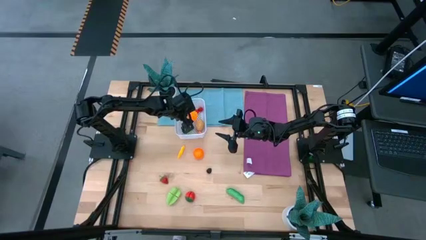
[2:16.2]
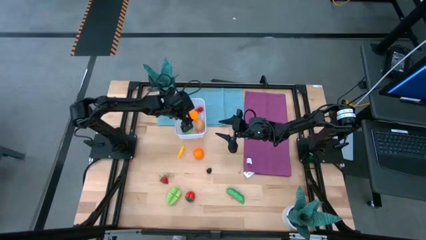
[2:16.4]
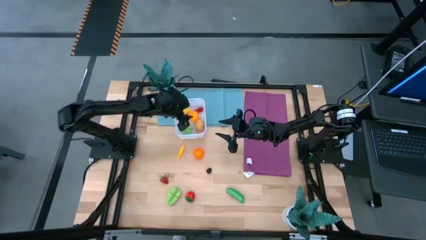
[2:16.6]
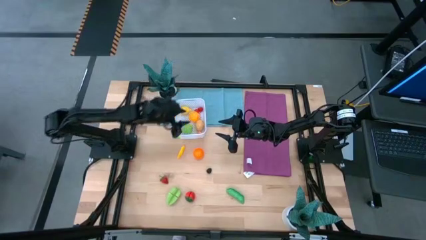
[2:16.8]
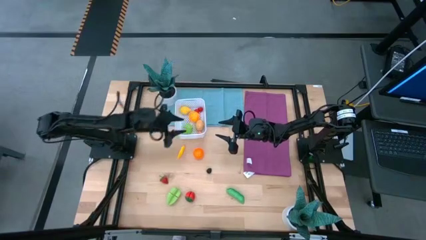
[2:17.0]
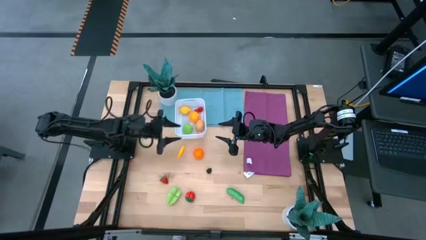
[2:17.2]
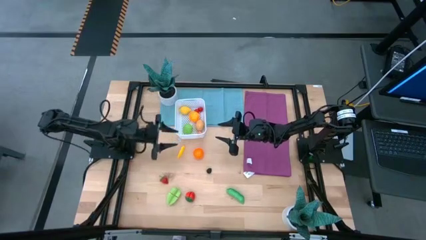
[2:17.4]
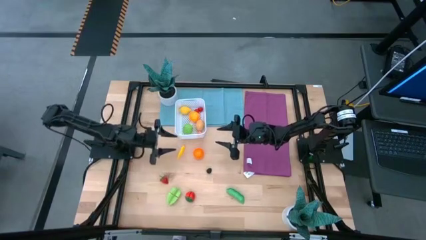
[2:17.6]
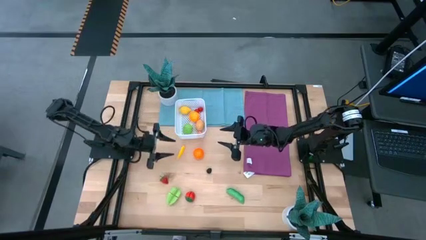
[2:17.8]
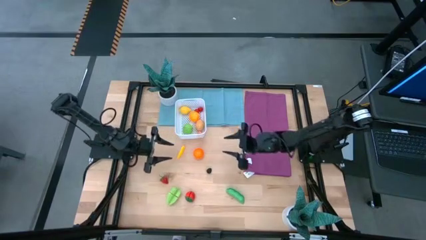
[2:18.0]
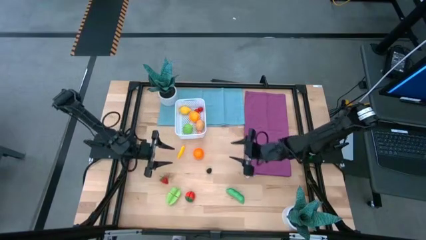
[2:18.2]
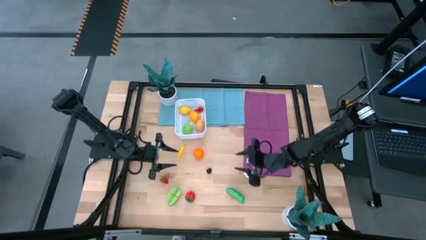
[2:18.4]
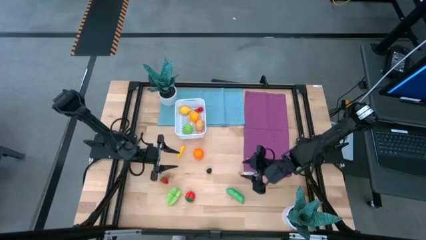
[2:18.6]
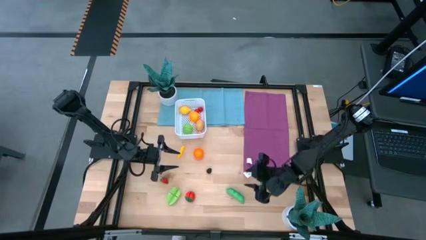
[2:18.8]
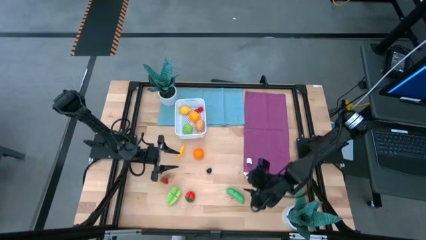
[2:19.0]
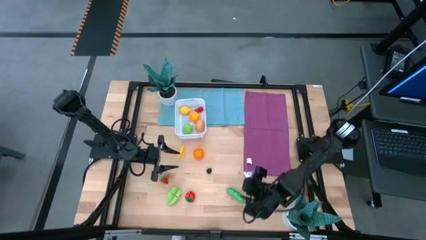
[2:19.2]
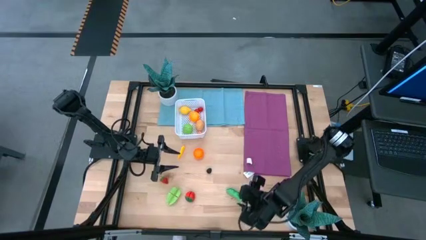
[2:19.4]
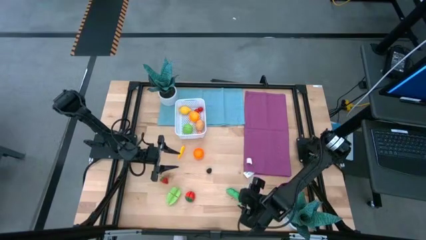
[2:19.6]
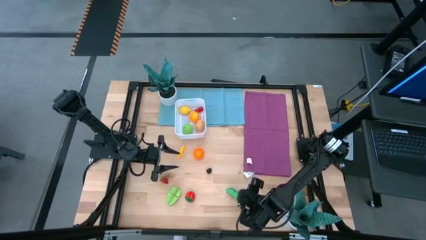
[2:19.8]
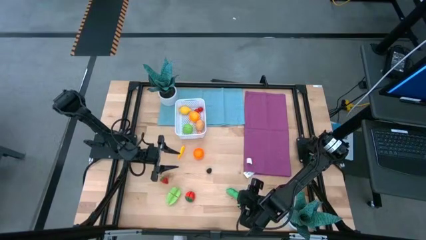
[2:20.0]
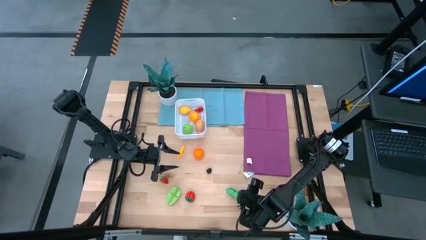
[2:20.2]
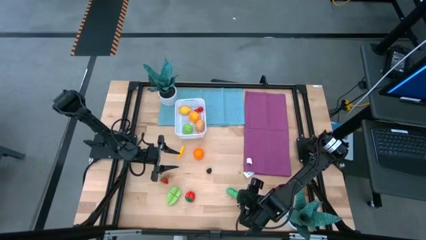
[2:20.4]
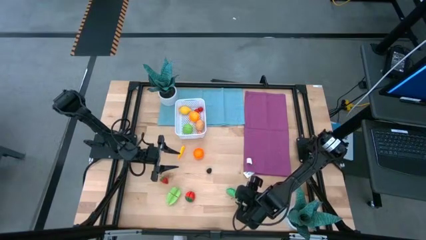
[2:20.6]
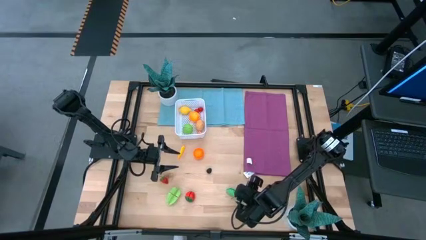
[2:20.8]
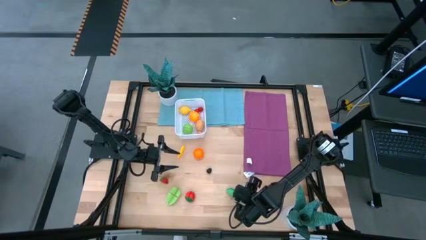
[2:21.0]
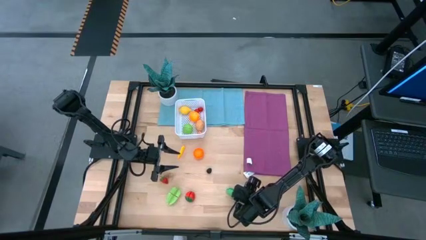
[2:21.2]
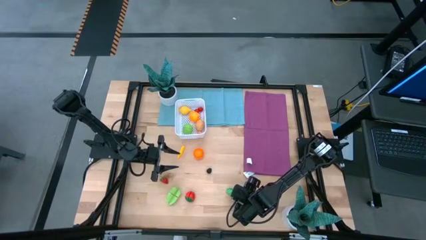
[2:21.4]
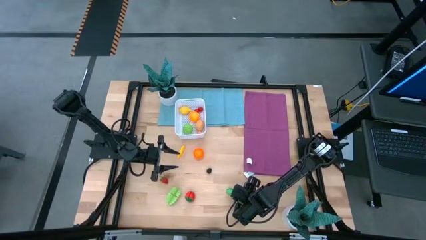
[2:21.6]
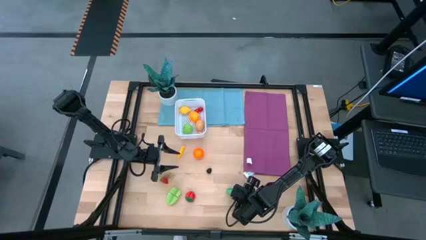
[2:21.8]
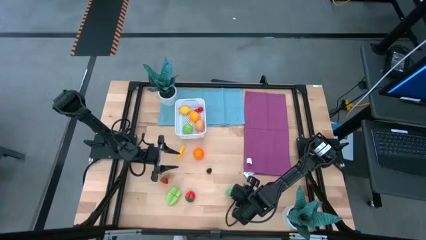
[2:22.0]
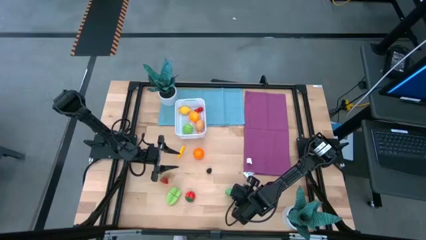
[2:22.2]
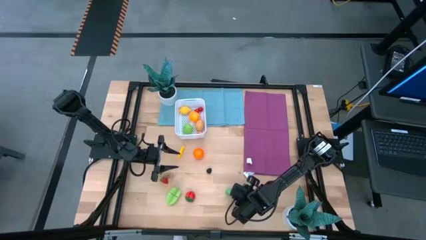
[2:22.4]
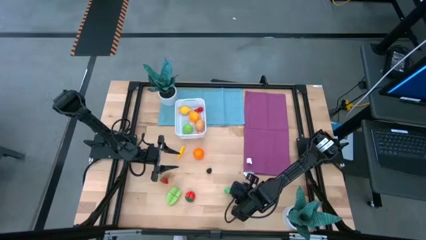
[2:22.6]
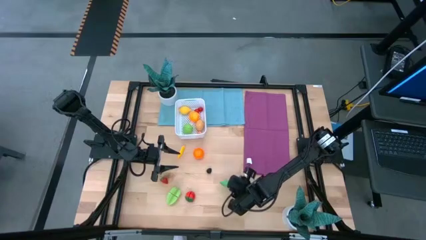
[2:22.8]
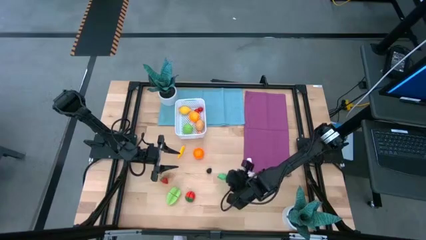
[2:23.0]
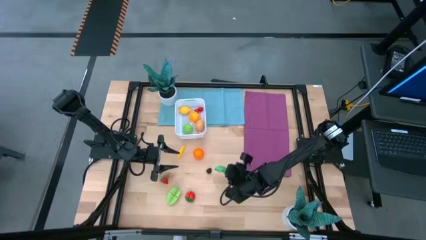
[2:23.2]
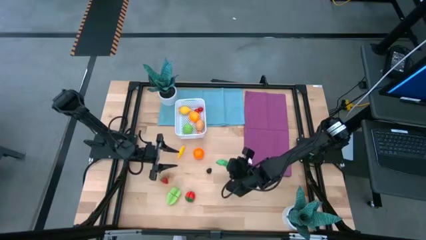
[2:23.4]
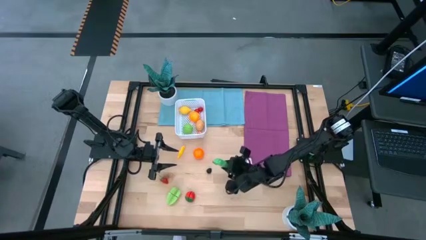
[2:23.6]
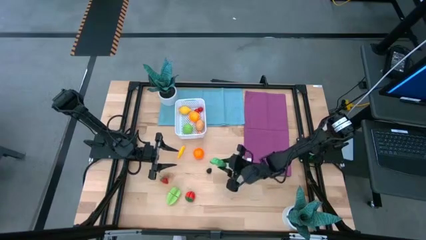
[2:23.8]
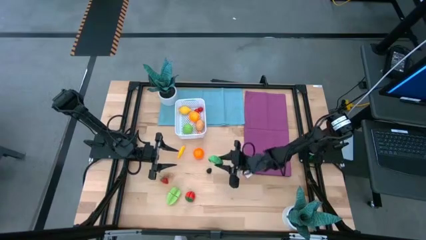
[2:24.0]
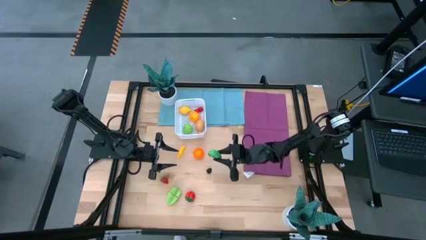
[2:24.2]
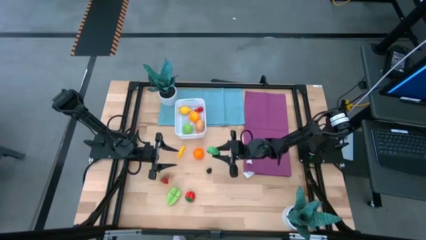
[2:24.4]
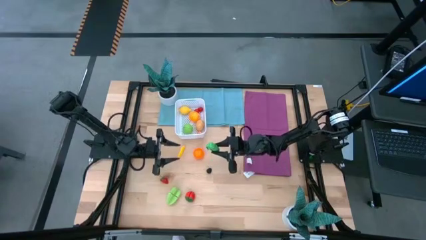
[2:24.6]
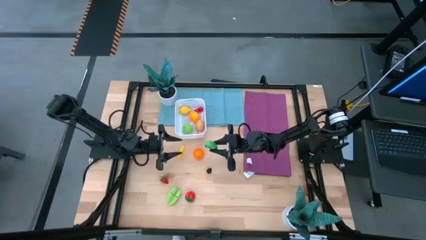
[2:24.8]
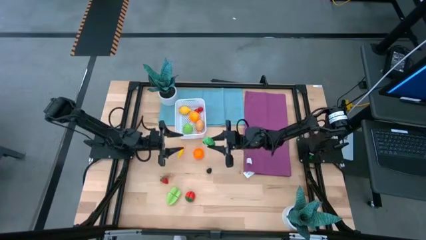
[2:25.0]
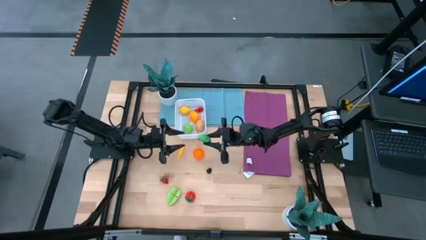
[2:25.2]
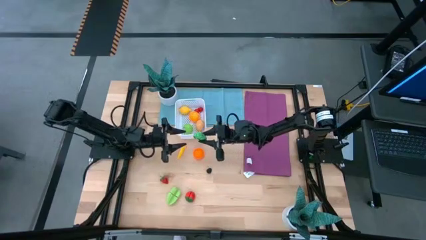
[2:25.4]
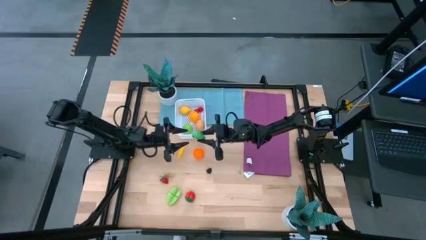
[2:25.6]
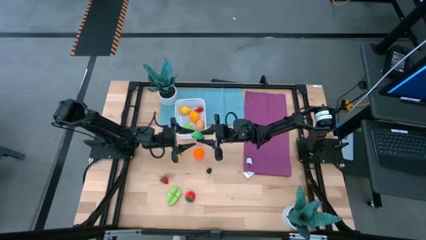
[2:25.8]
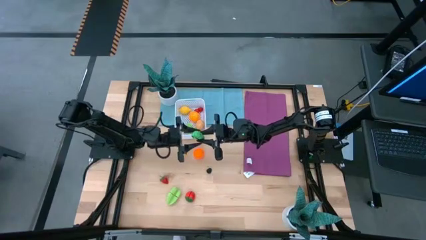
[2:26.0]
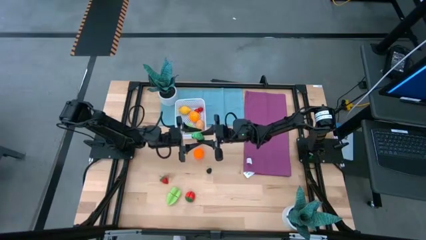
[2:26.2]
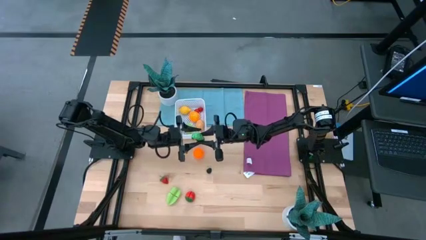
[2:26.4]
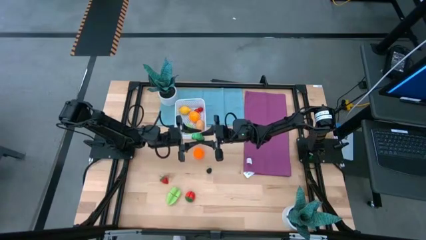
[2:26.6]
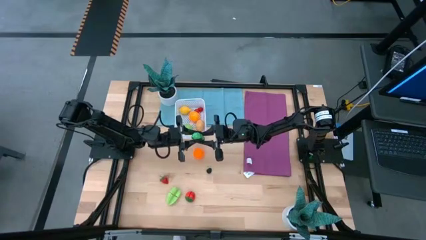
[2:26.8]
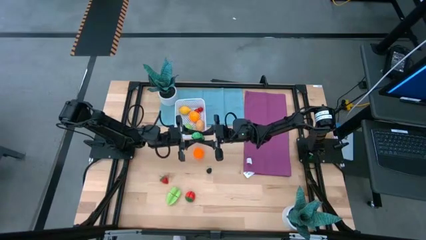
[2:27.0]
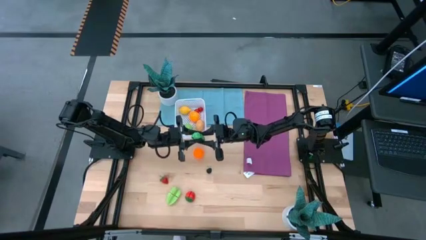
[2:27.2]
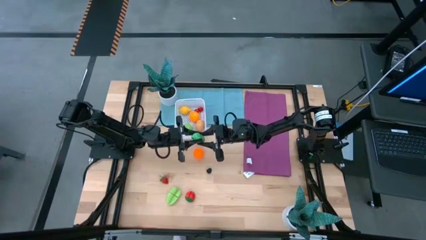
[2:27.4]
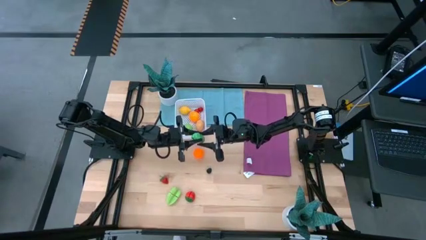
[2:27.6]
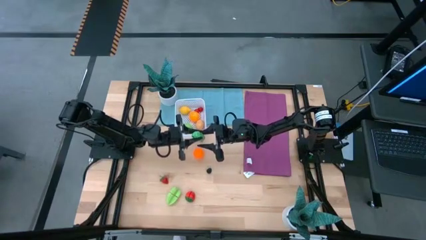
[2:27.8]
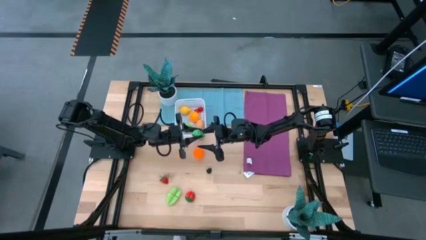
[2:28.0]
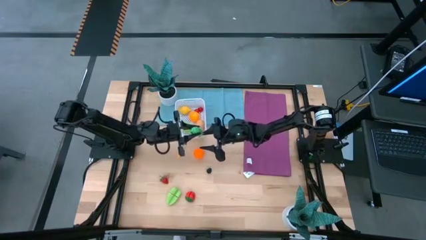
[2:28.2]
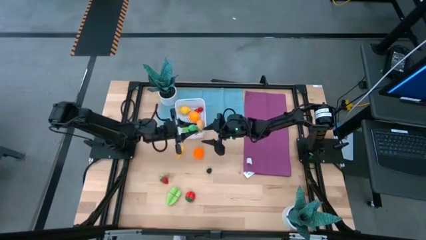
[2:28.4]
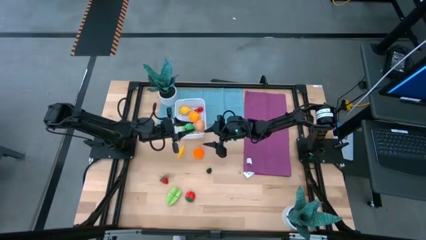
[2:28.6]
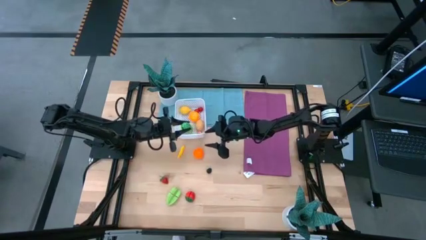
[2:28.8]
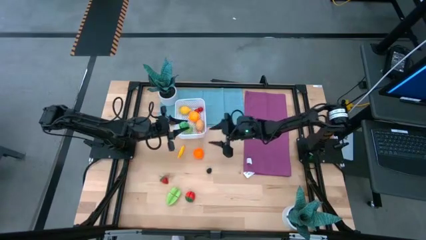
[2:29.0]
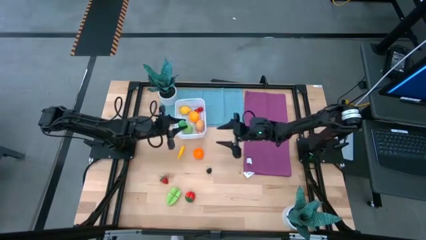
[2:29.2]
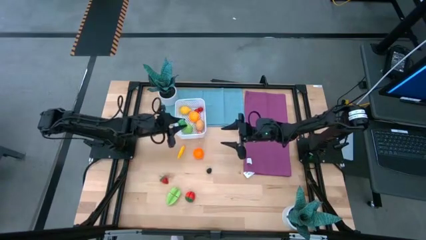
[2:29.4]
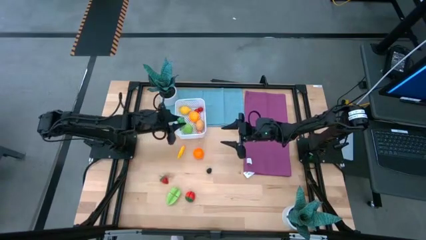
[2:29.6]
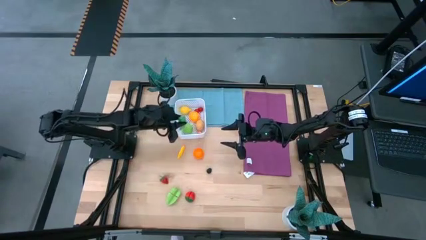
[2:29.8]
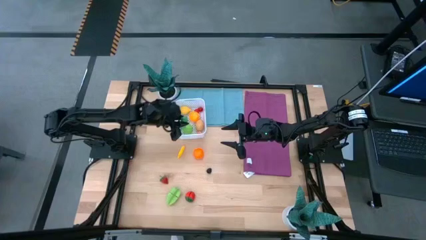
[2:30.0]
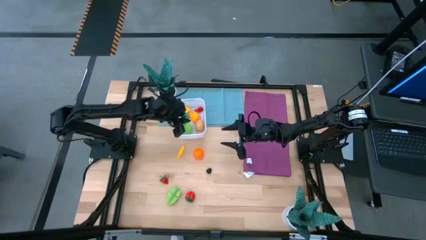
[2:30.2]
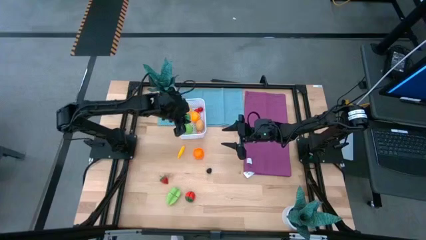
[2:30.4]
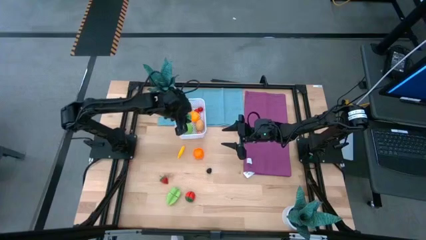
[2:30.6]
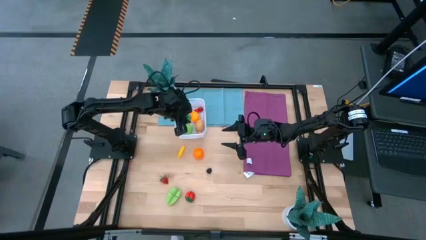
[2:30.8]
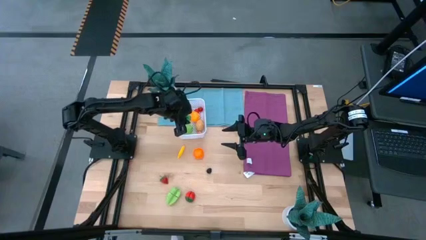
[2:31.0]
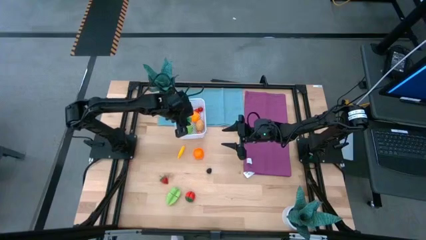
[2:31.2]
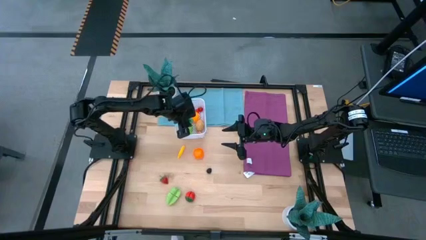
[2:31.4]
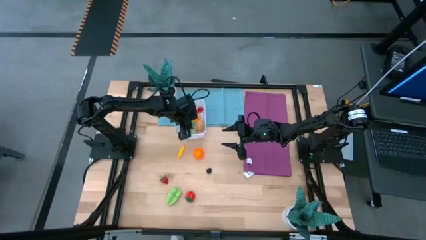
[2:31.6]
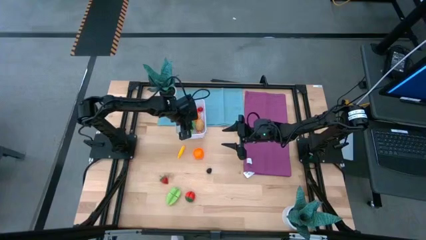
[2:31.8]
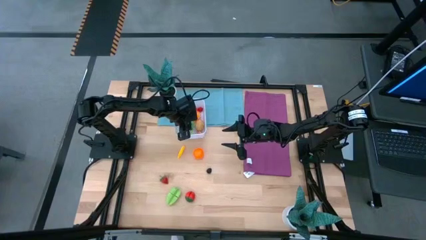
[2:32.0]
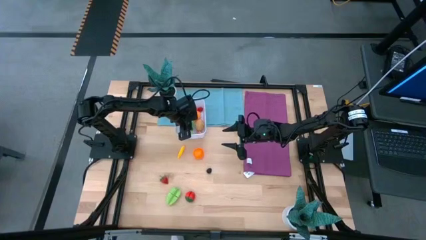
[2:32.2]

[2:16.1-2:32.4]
Task: Pick and placing Produce into tupperware
Put the green pea into the white basket

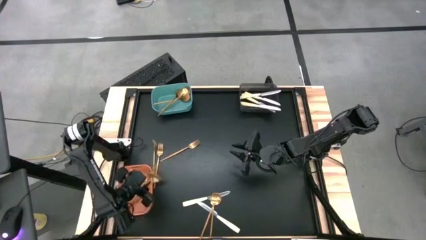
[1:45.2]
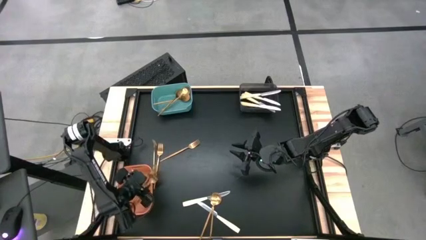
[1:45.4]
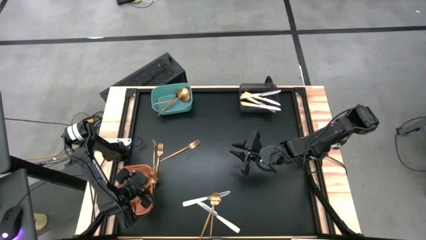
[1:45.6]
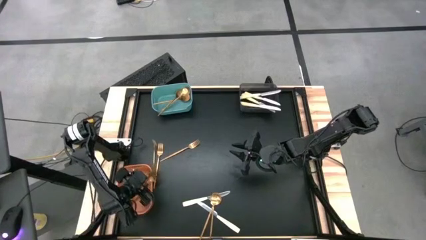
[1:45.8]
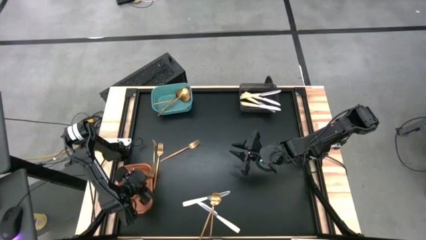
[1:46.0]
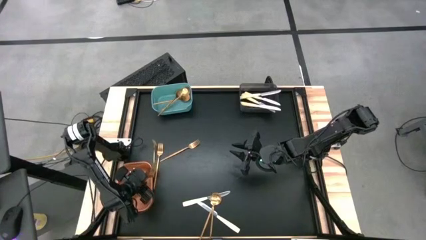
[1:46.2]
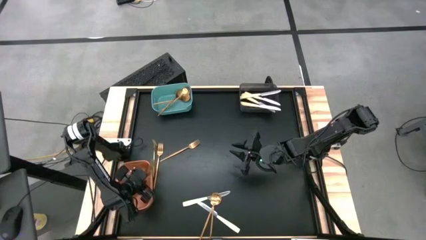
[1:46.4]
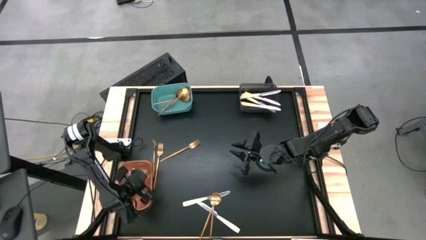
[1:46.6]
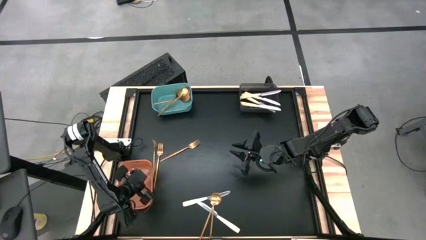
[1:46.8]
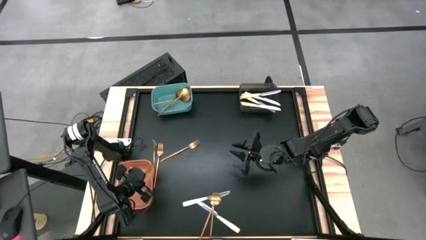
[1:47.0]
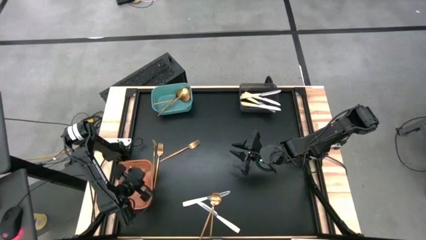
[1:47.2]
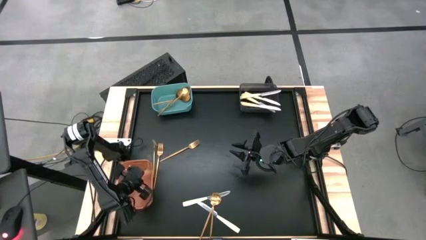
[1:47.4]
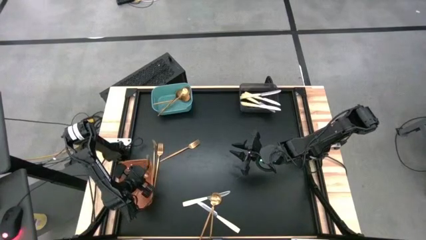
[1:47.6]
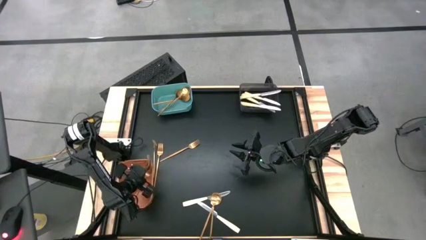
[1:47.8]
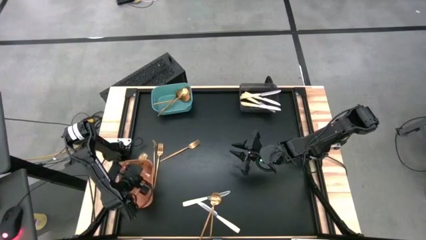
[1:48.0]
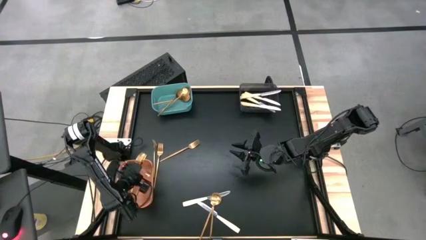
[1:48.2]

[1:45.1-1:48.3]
Task: Sort silverware by color (type)
Adjust the gold forks in the orange bin
